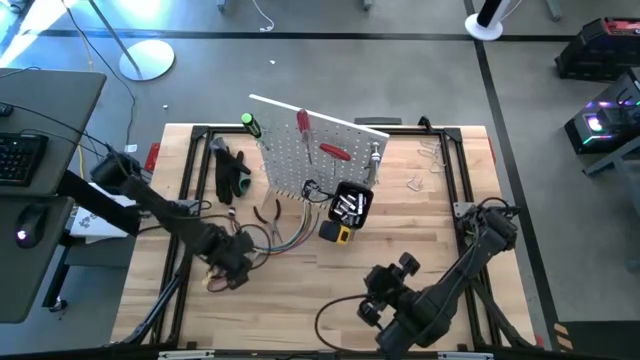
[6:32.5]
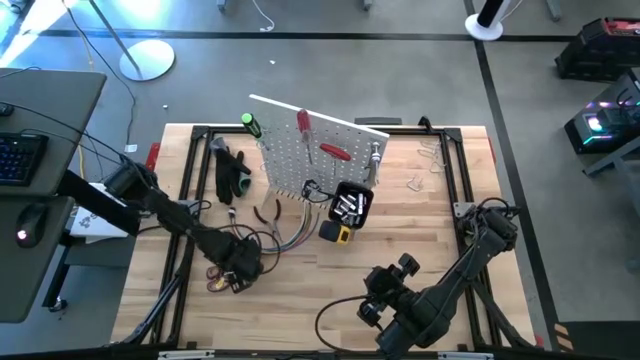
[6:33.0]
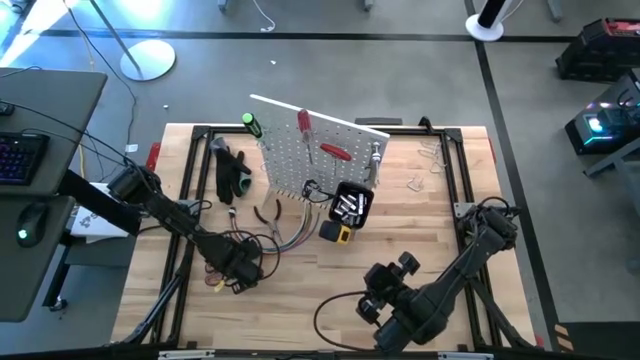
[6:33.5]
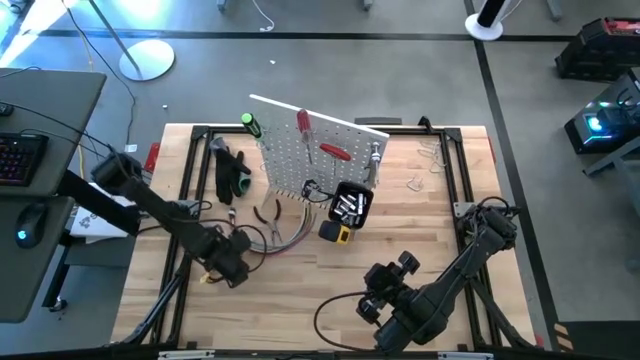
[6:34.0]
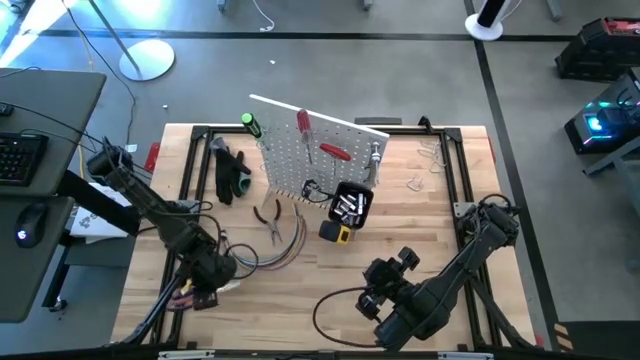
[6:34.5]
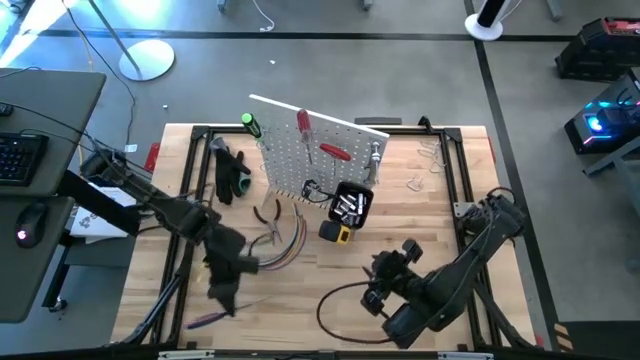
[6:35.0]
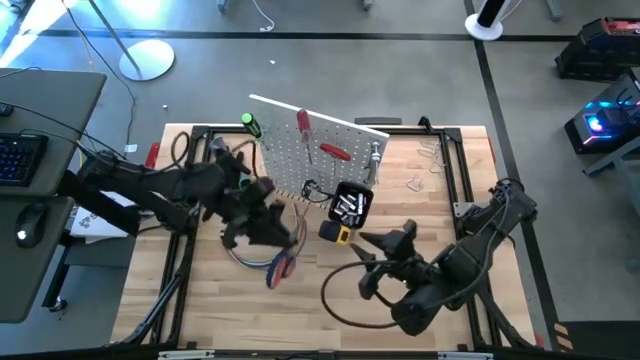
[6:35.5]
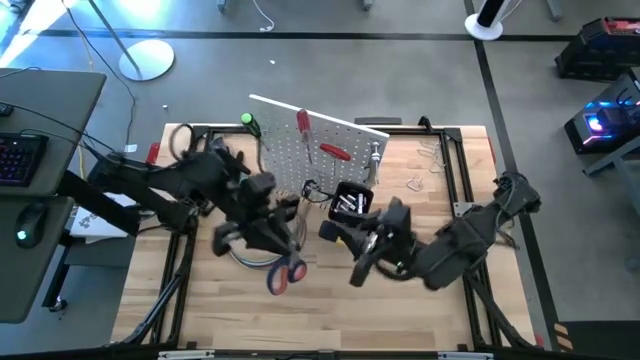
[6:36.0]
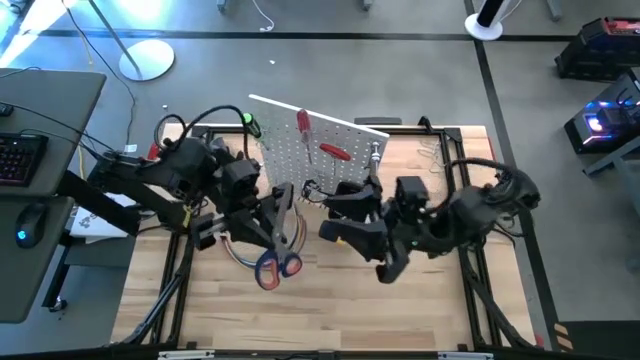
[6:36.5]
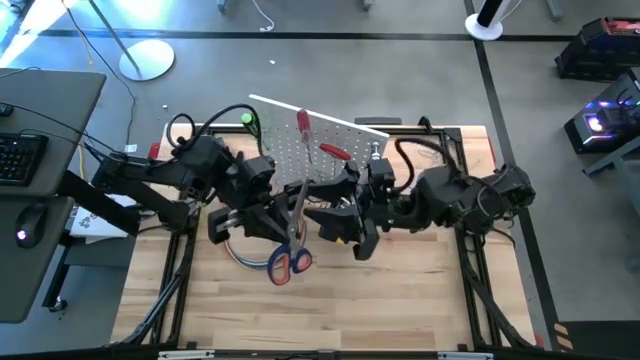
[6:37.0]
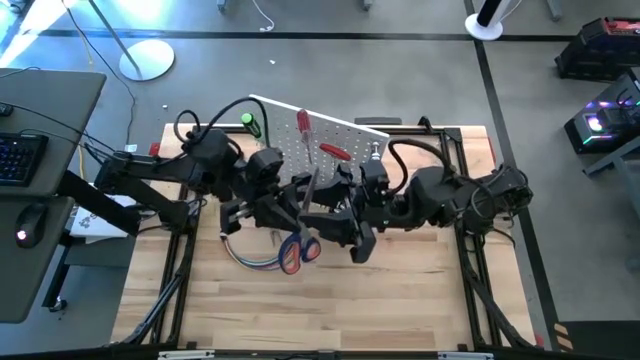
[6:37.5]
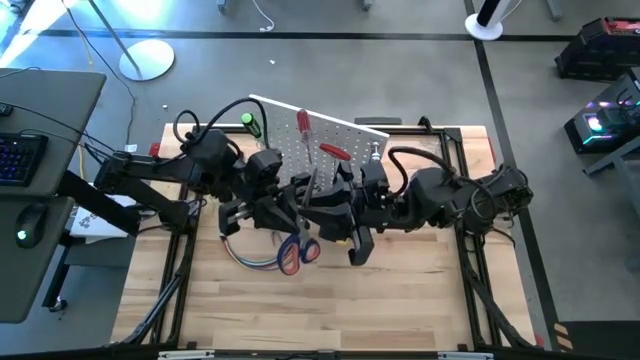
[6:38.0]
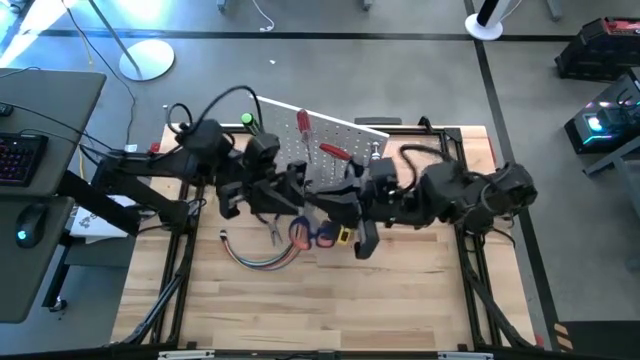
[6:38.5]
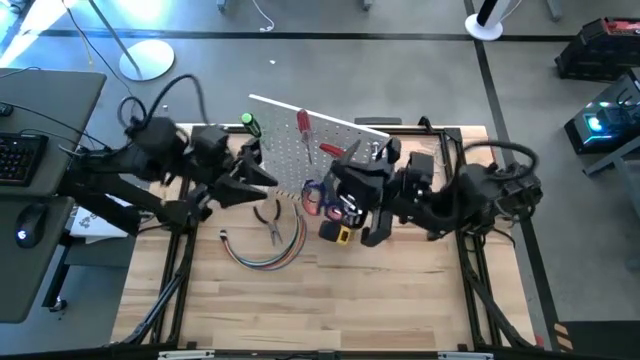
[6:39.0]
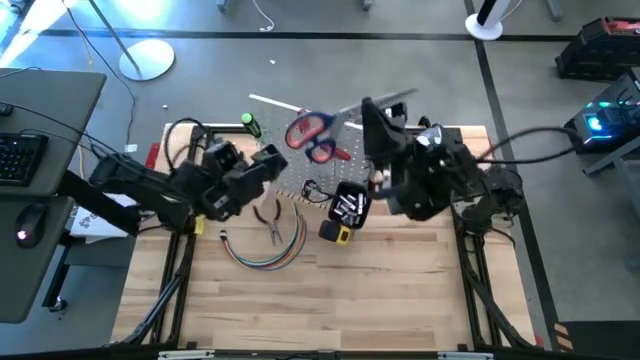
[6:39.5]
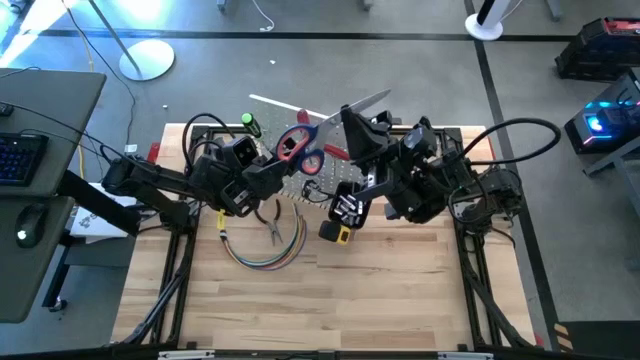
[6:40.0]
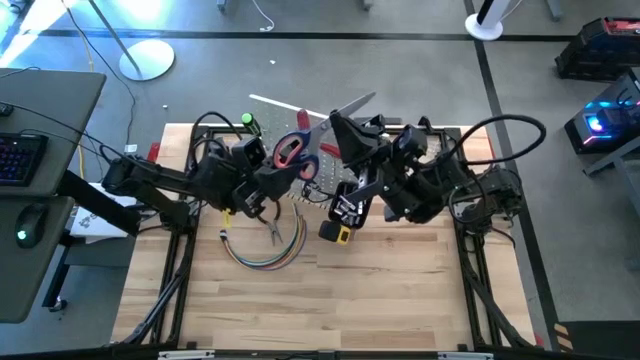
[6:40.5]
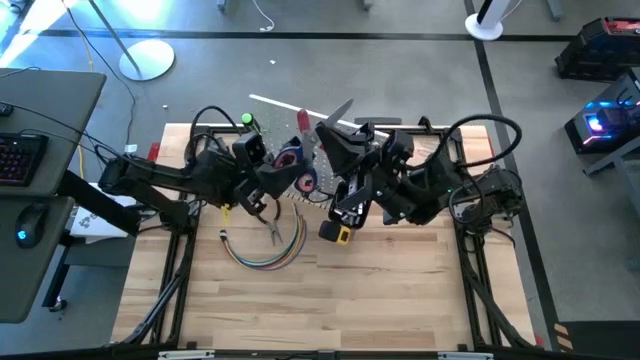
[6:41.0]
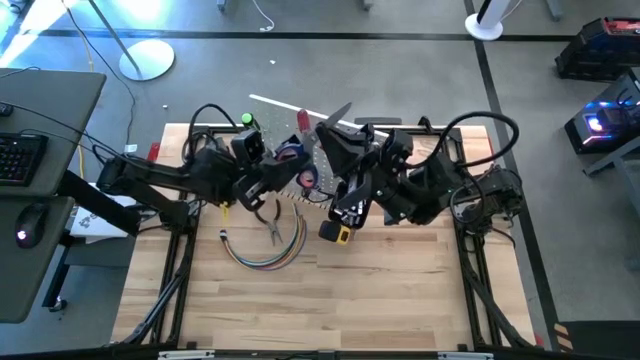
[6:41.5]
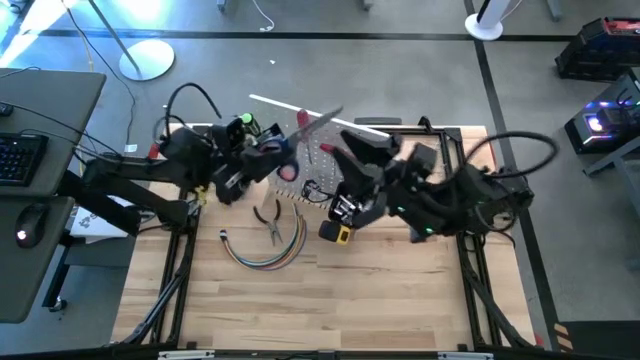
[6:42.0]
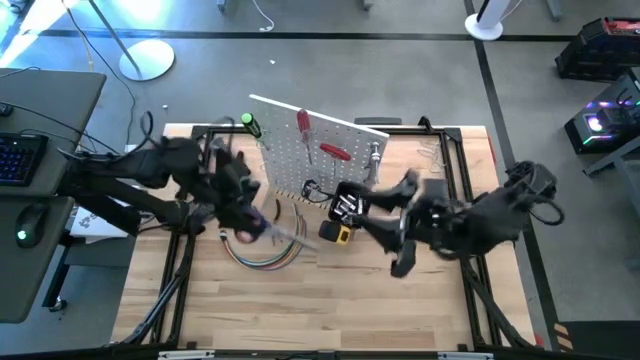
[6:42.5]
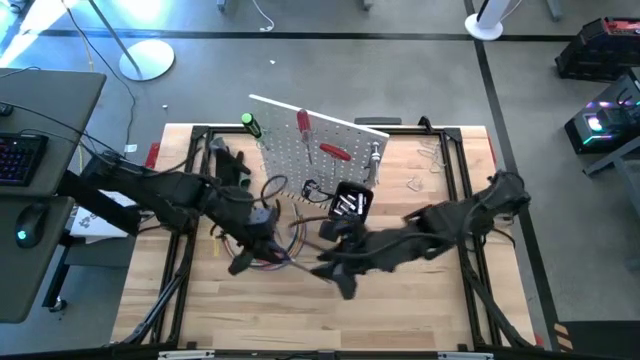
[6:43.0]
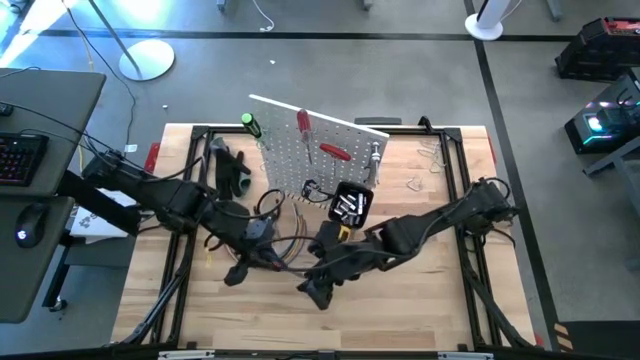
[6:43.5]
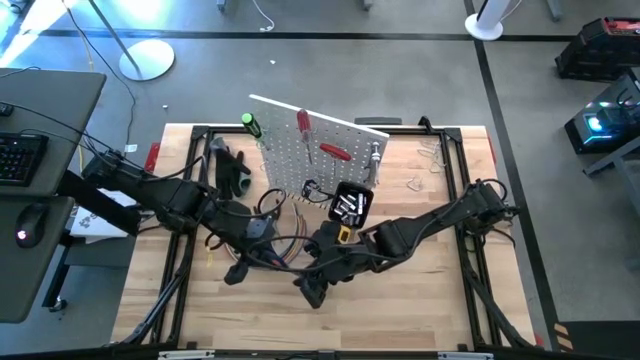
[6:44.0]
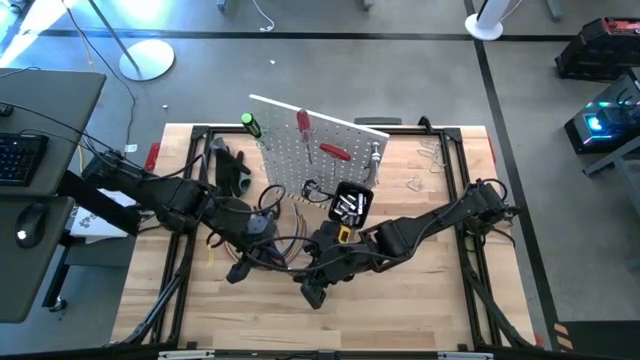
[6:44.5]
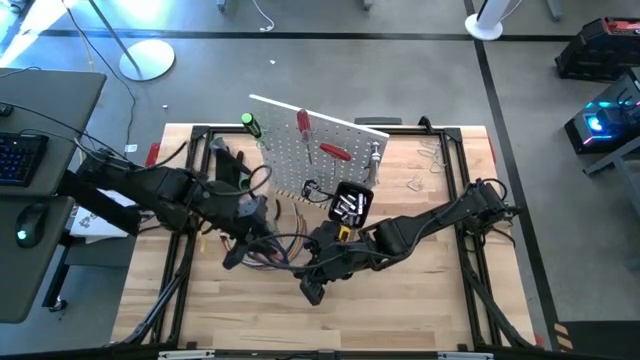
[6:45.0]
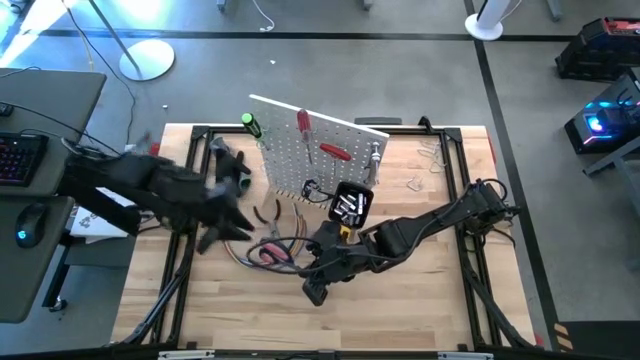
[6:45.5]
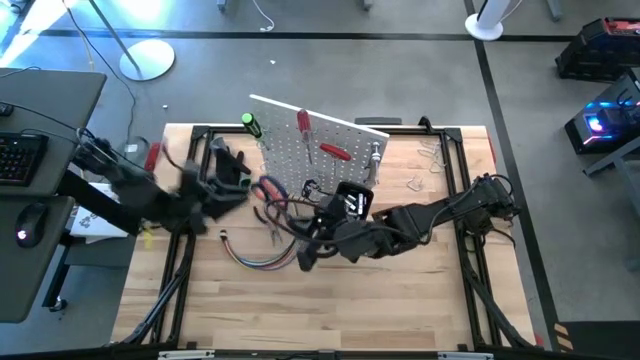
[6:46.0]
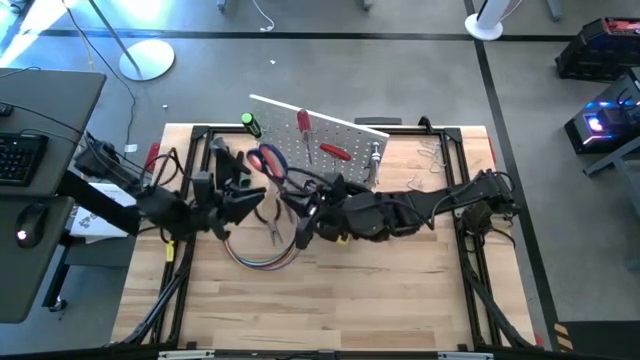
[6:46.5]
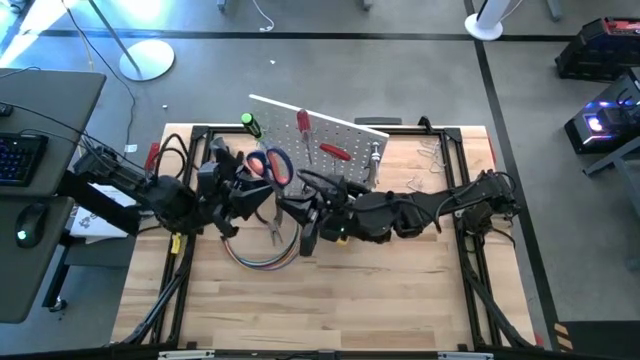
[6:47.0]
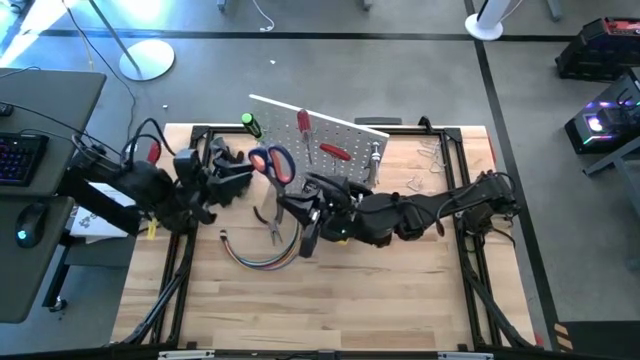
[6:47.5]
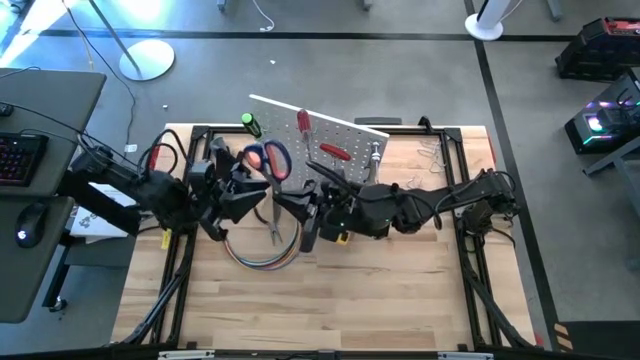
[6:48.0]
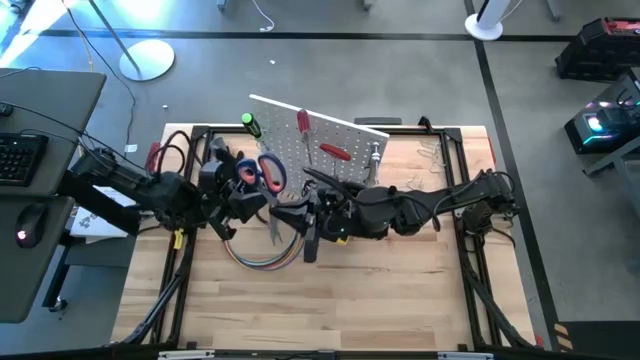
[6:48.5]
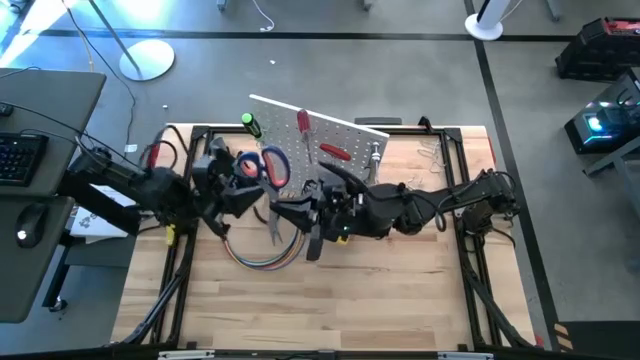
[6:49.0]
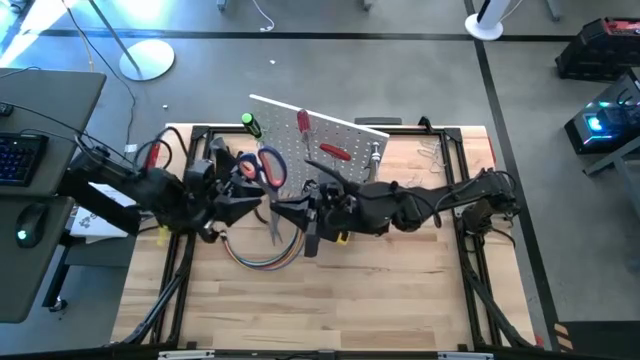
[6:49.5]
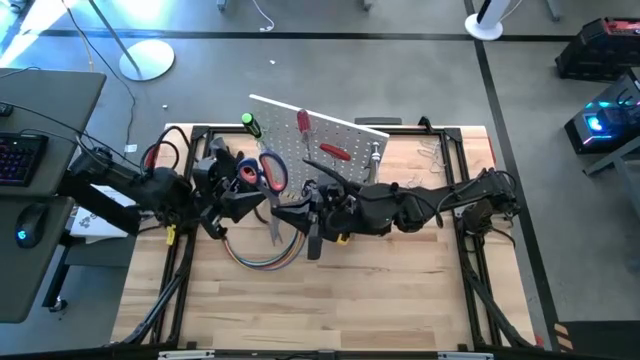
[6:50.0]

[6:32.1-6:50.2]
Task: Hang tools onto peg board
Hang the scissors on the peg board

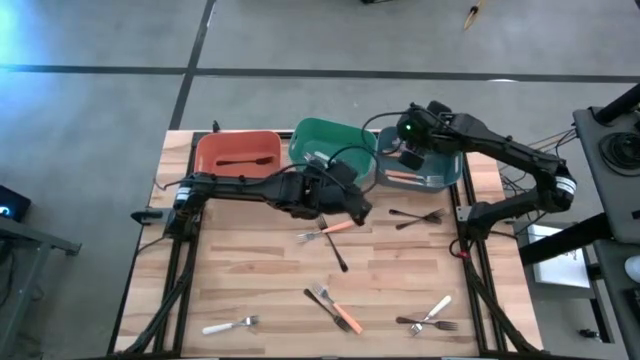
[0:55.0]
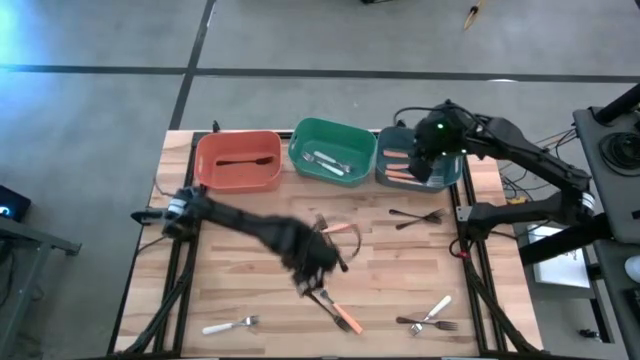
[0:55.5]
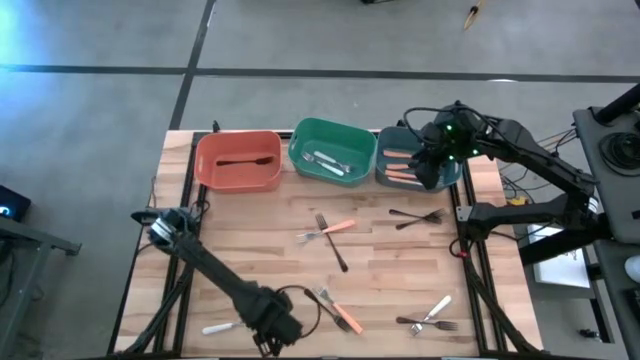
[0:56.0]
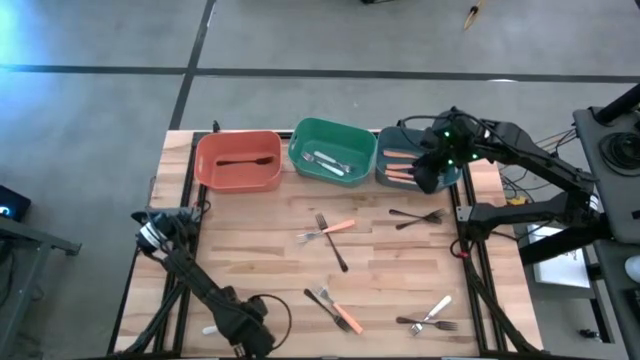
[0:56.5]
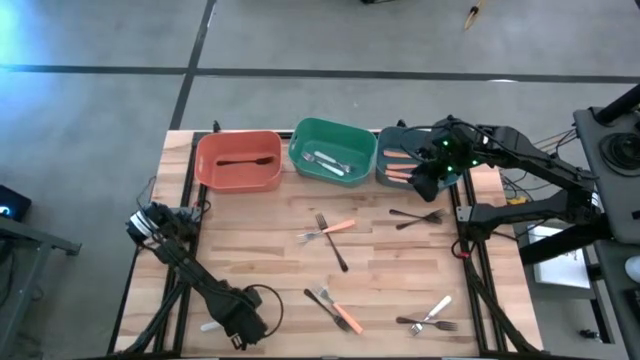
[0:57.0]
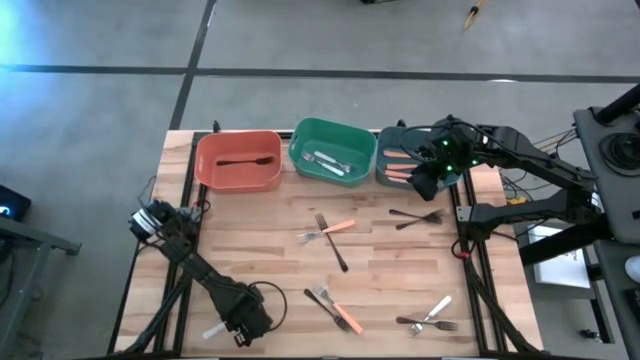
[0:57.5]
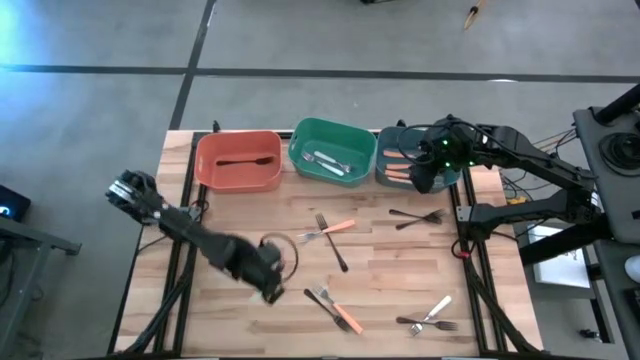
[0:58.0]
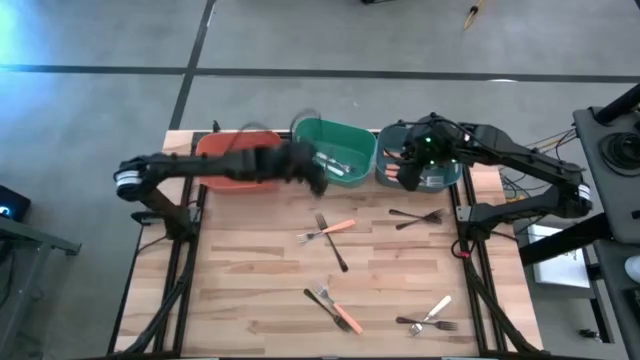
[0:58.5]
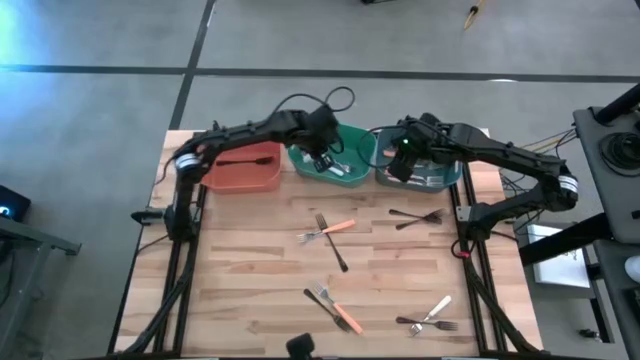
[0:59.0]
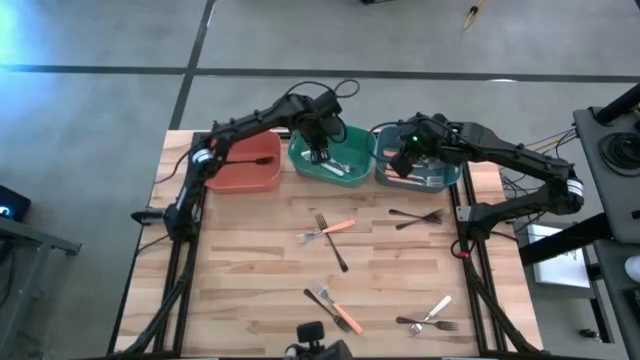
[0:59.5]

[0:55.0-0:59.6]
Task: Sort silverware by color (type)
Put the white fork into the green bin
